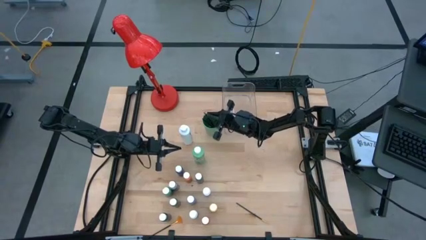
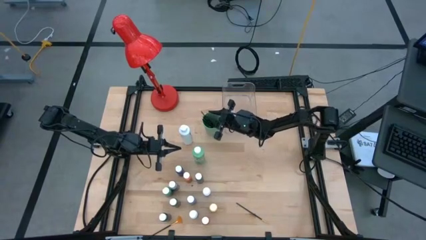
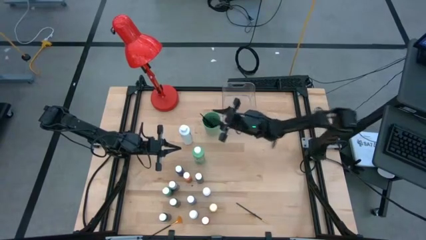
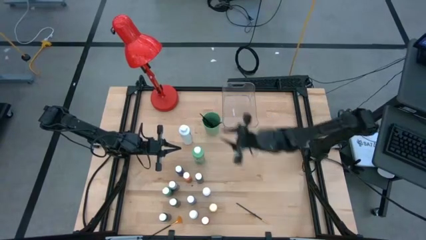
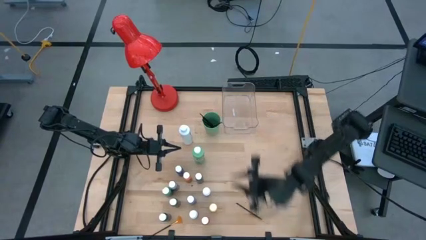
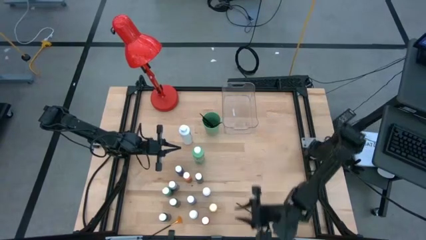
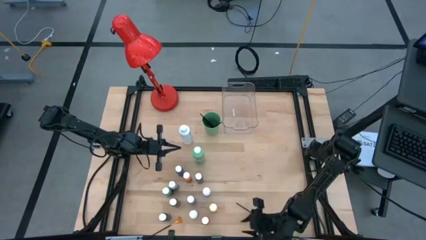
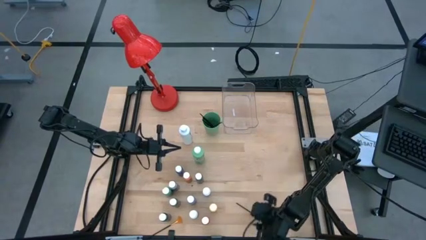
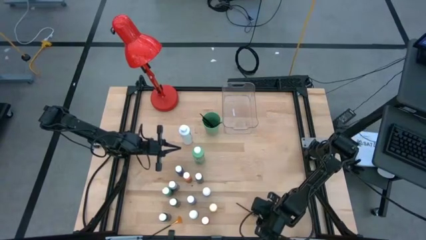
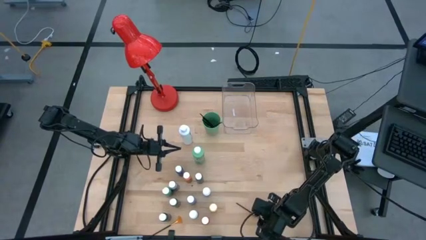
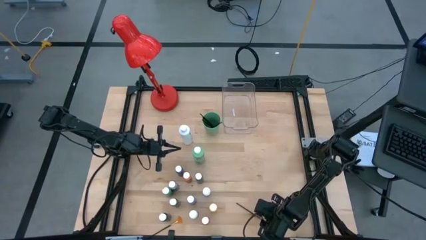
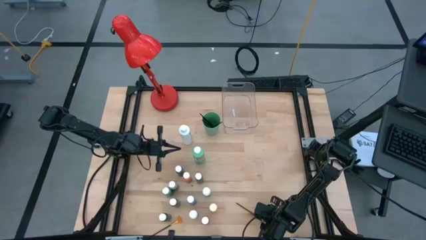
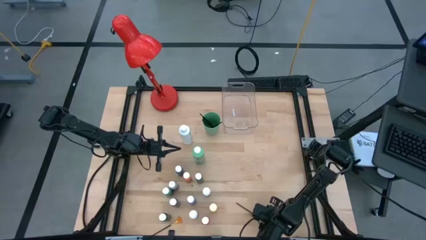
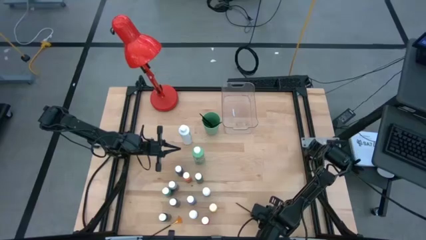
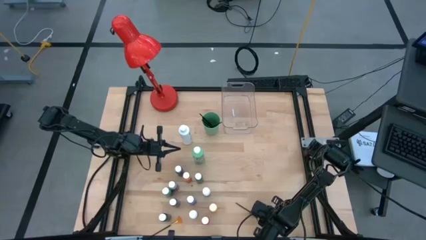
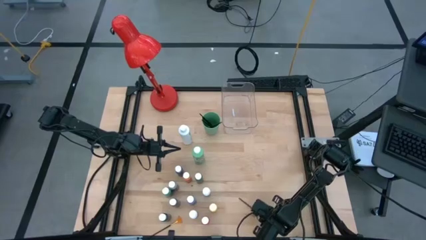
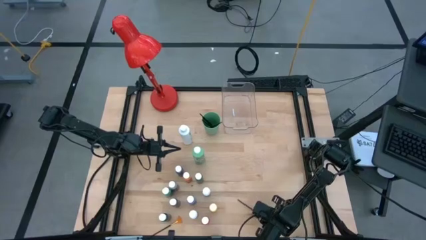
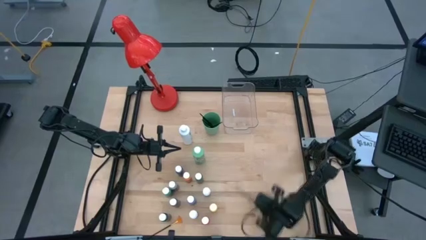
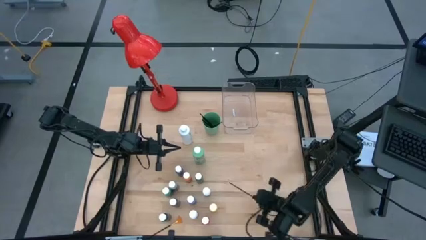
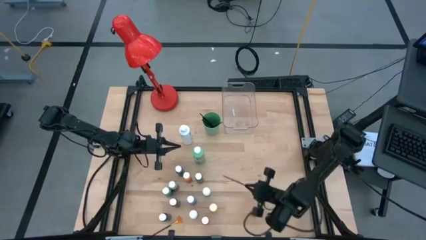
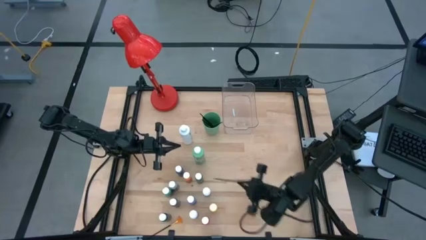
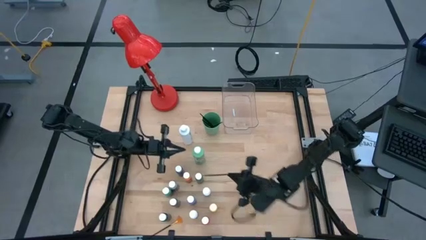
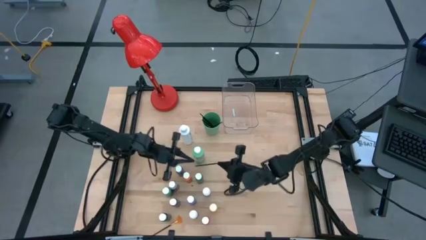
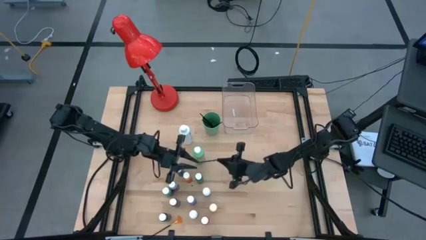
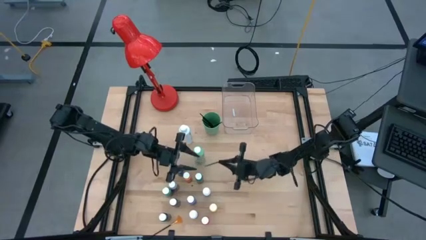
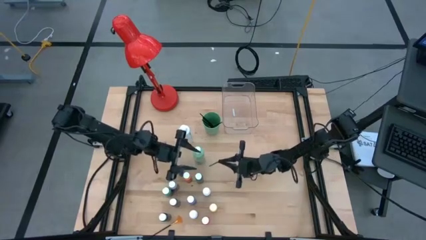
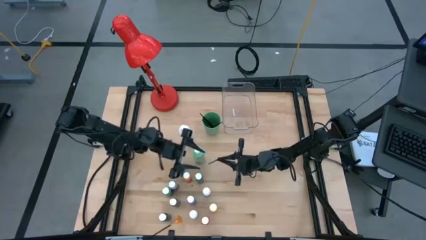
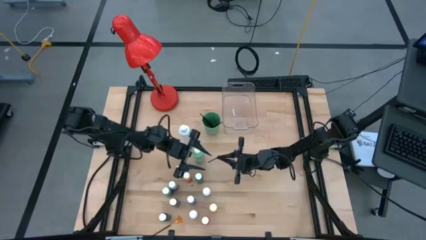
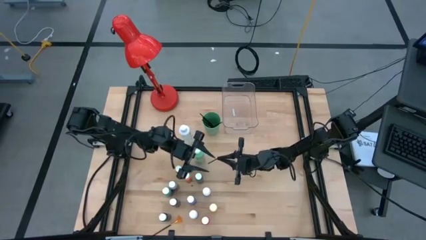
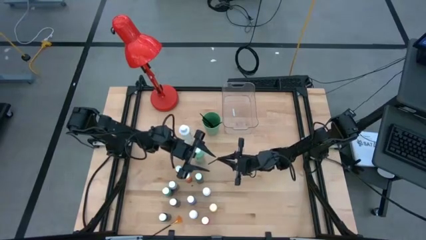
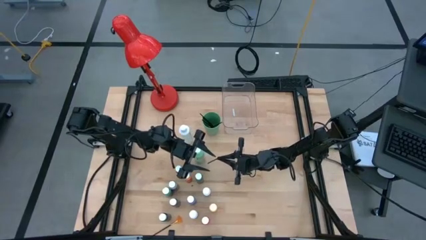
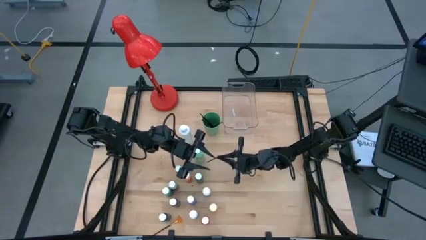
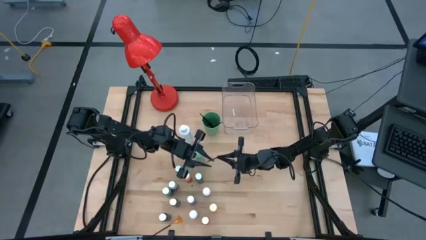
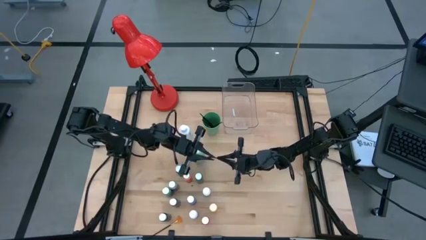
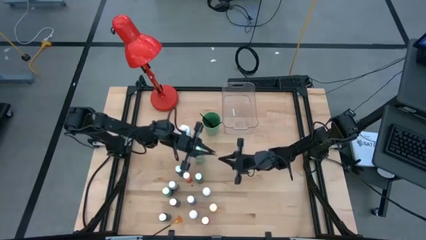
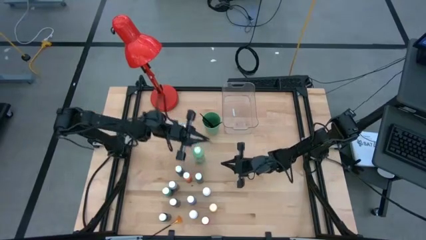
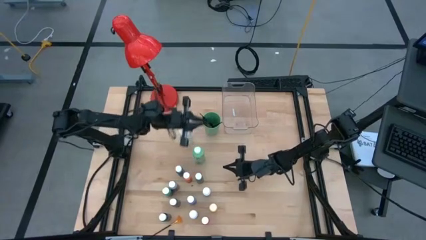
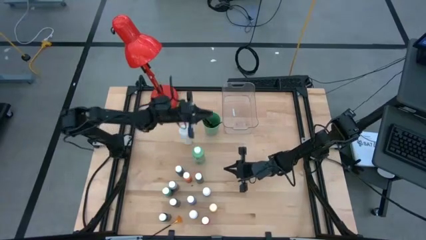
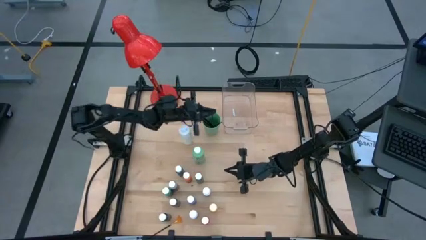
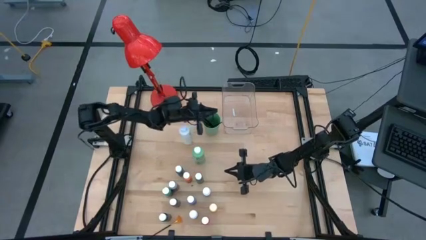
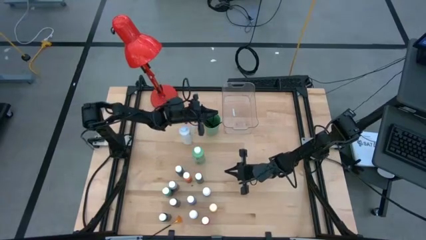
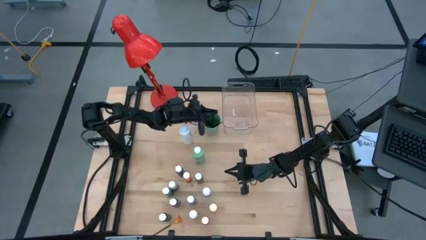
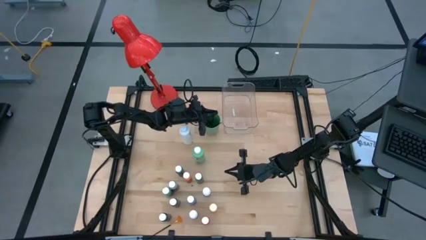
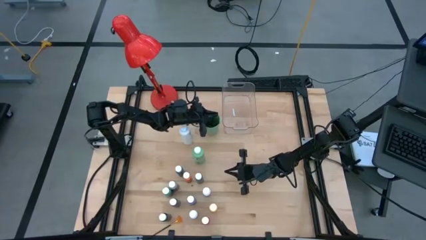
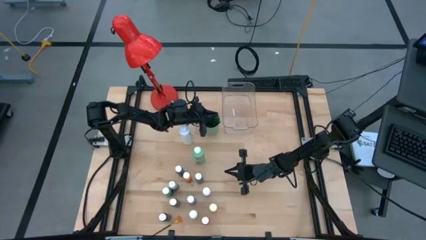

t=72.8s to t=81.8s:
Task: Pick & Place Paint Supplies
Put the orange paint brush into the green cup

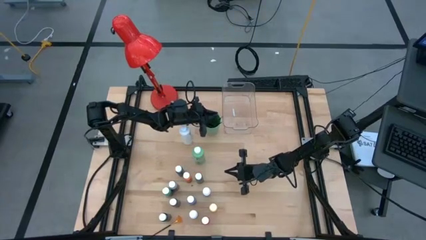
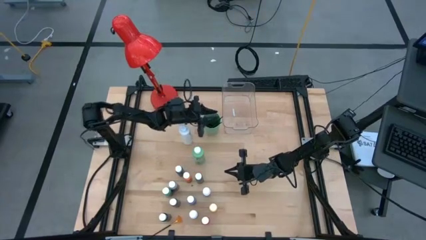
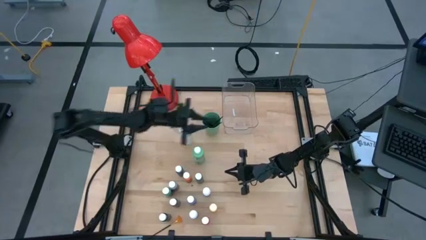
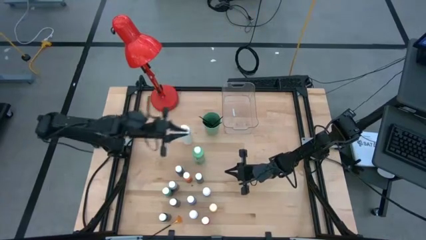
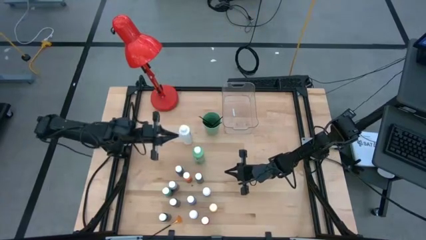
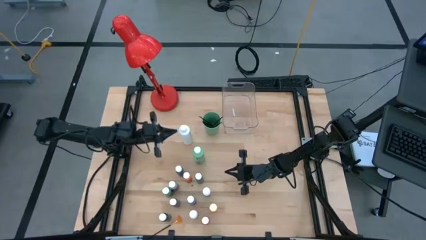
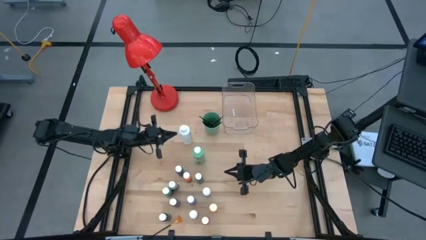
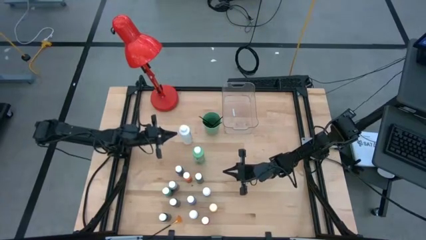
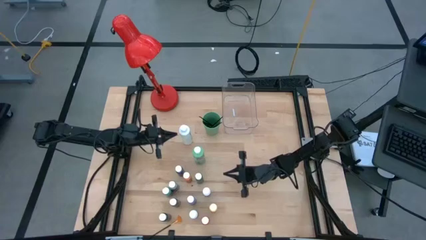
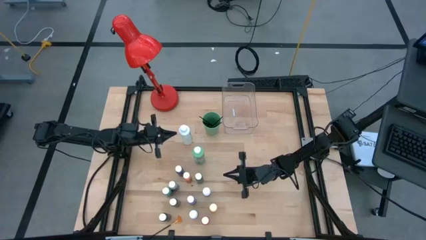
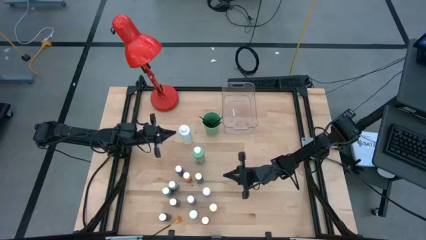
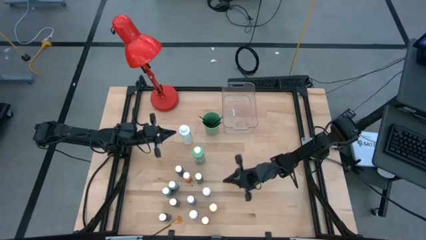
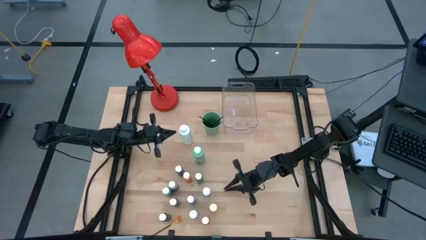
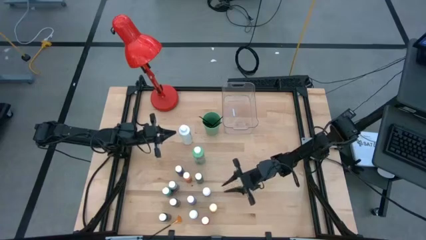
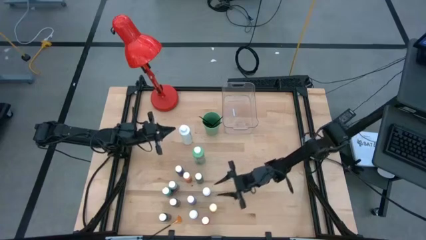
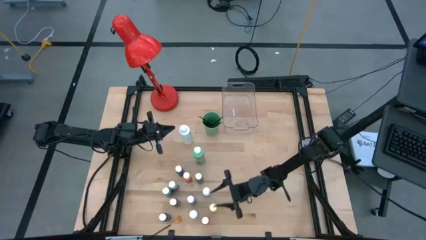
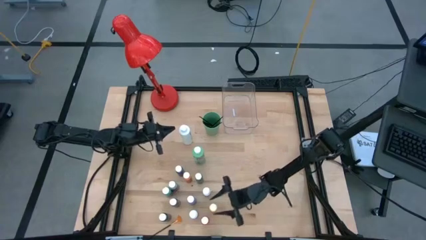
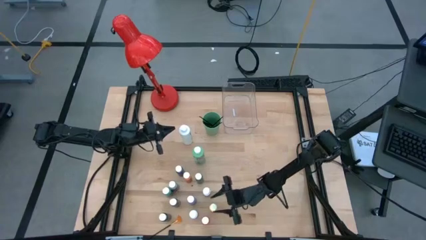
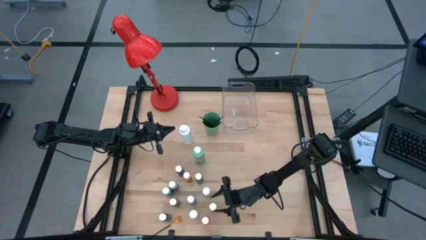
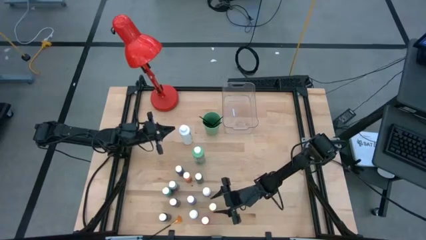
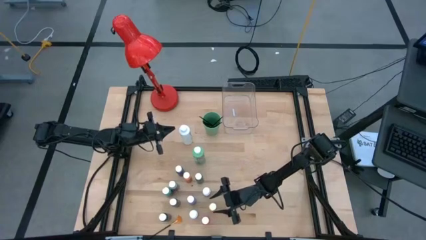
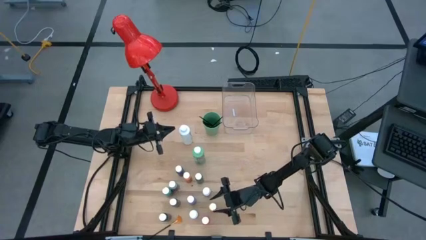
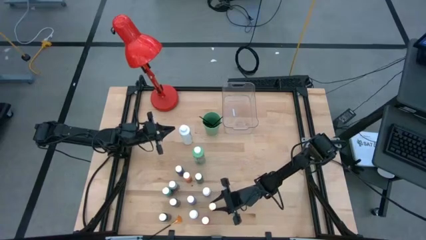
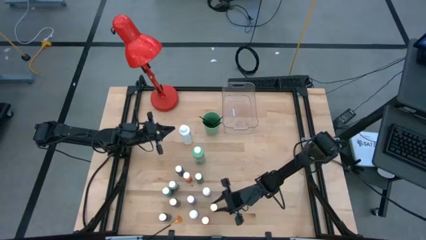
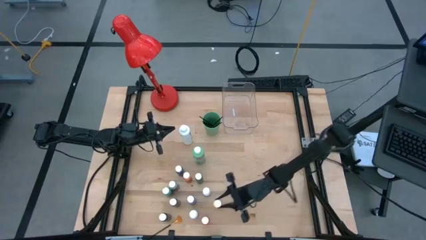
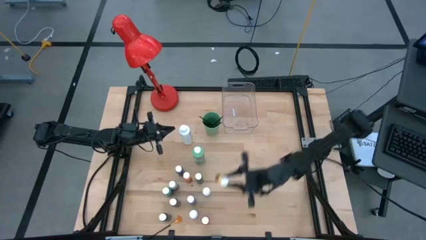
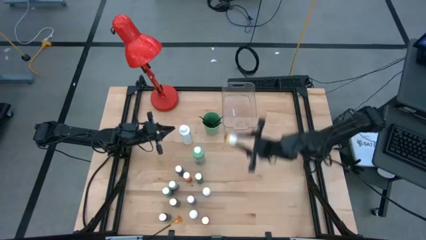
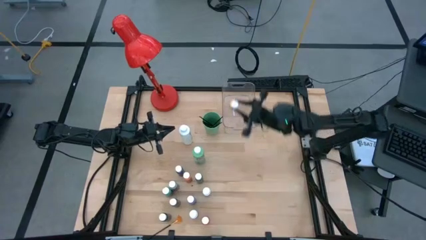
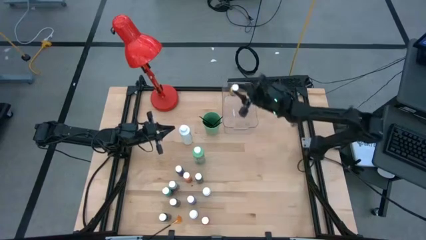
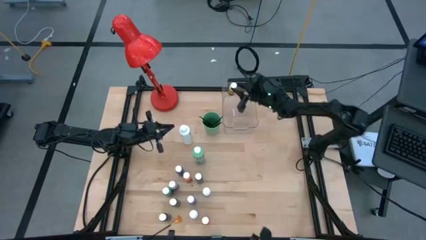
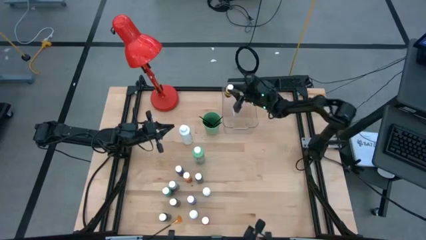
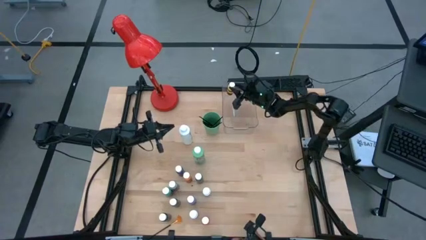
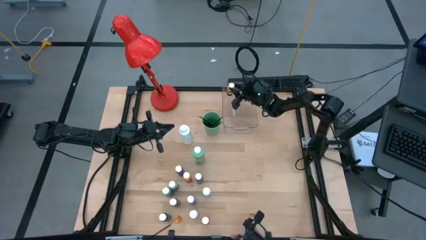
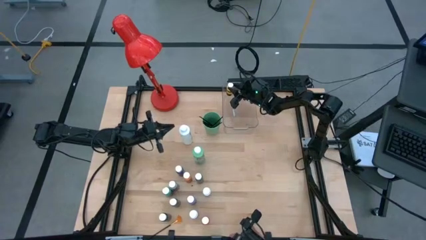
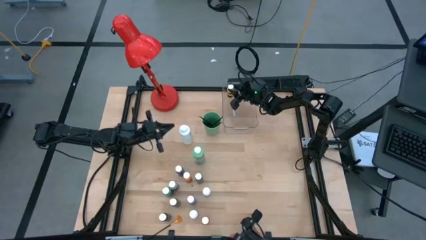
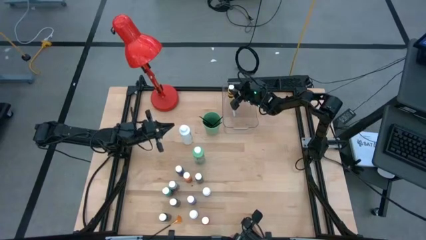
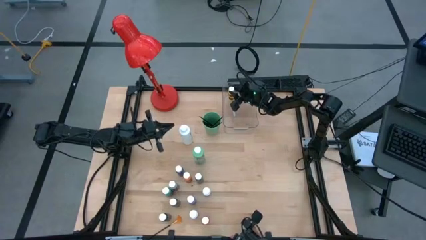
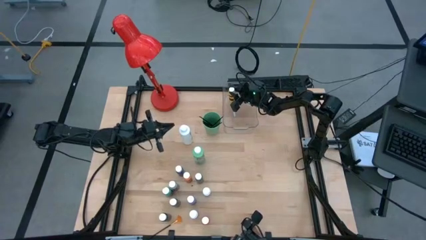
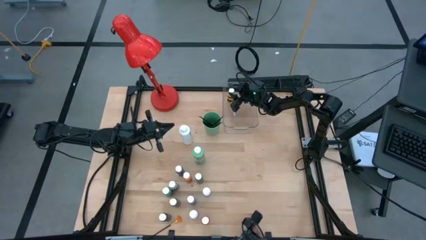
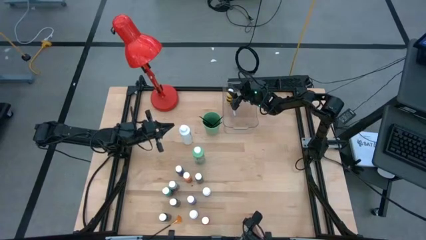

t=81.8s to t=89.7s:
Put the yellow paint bottle into the transparent bin
